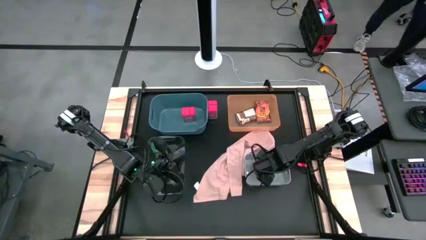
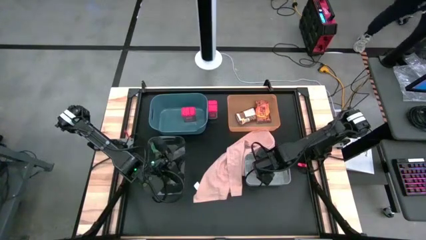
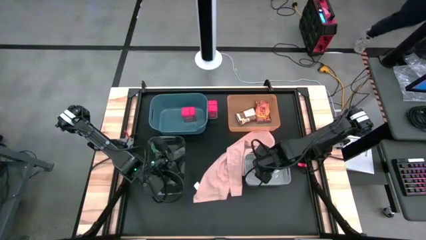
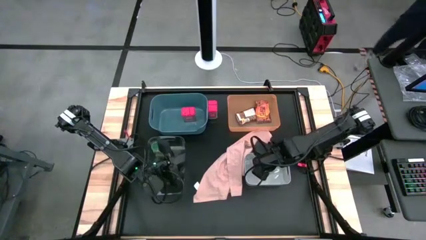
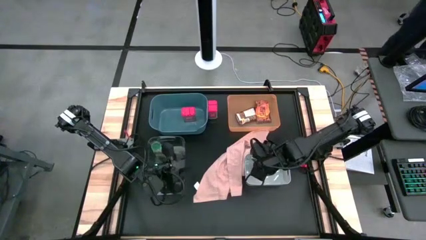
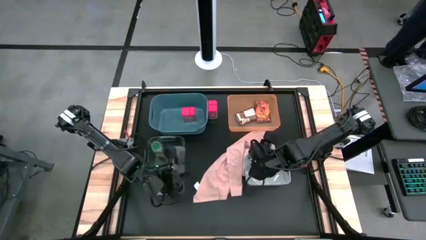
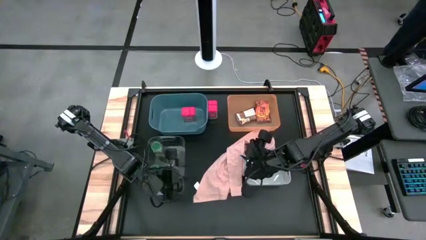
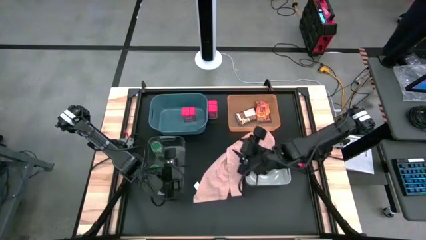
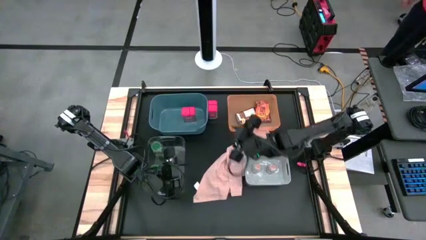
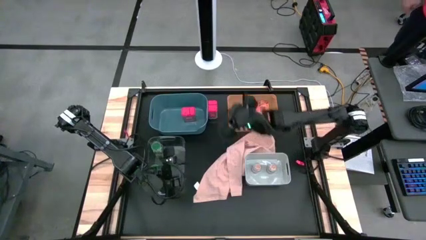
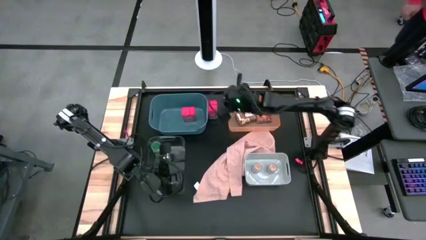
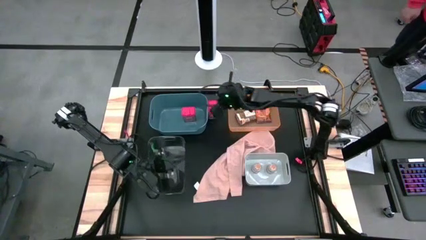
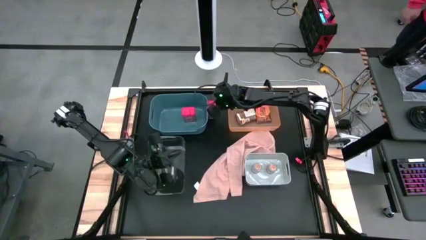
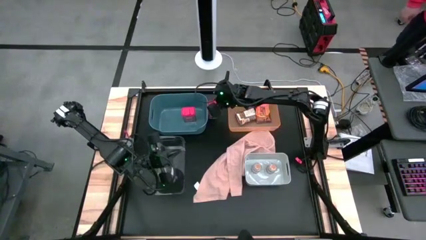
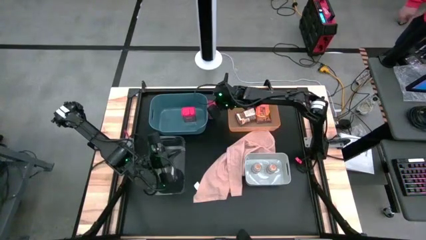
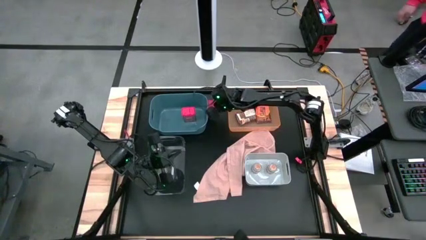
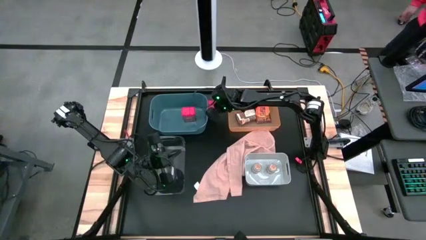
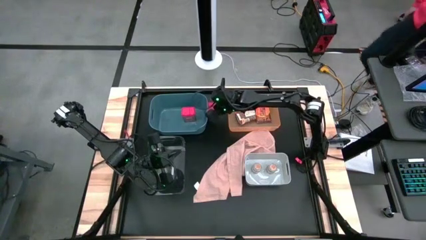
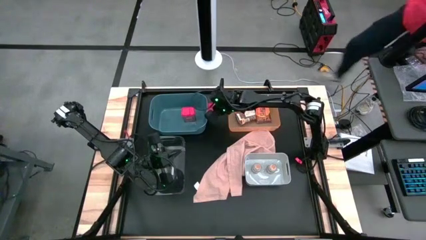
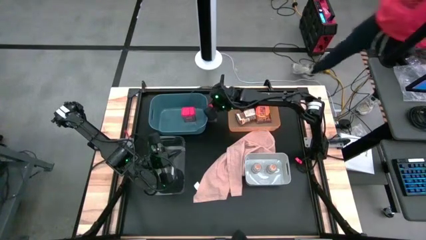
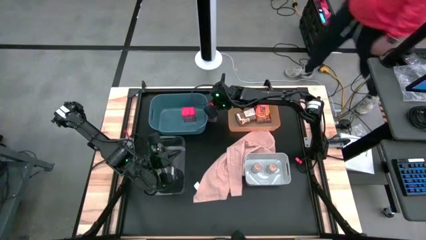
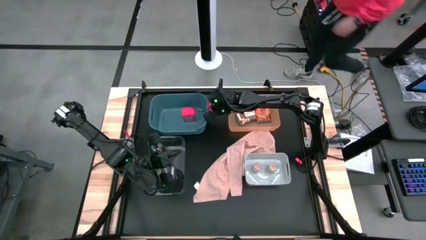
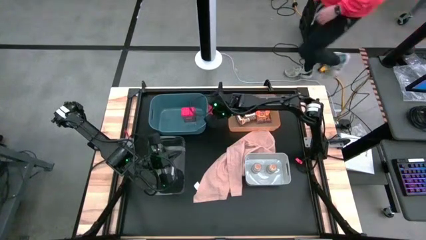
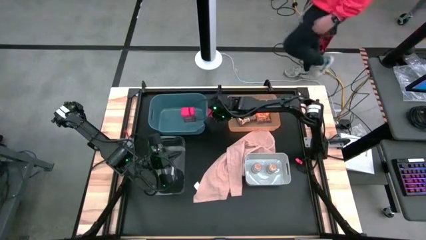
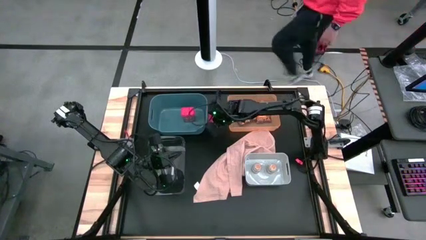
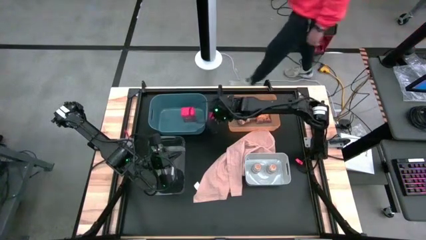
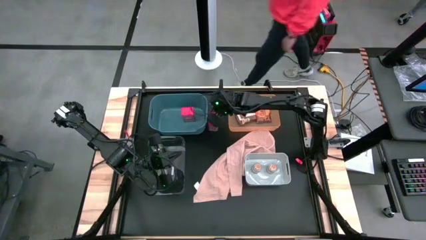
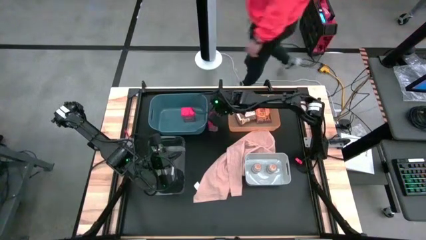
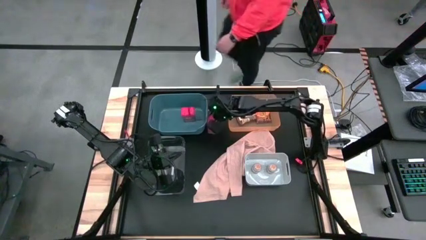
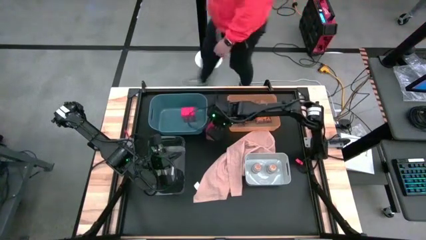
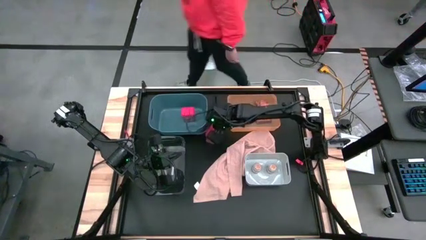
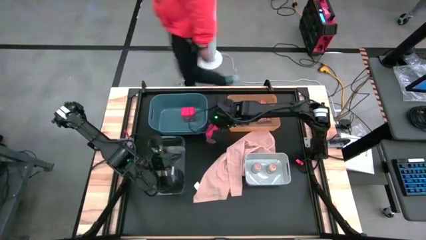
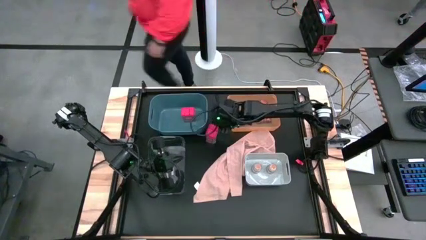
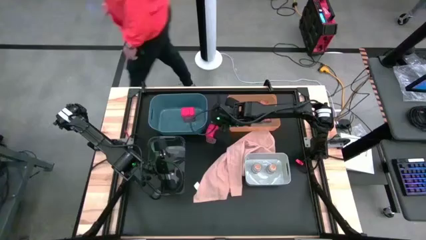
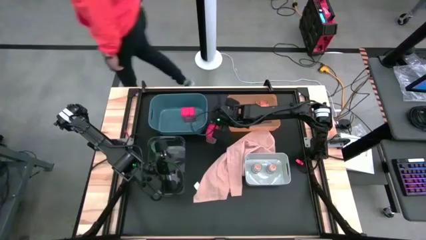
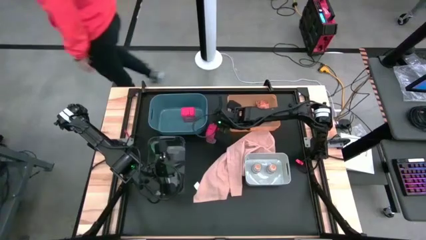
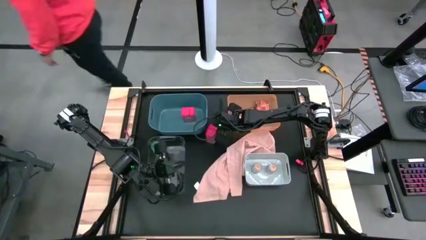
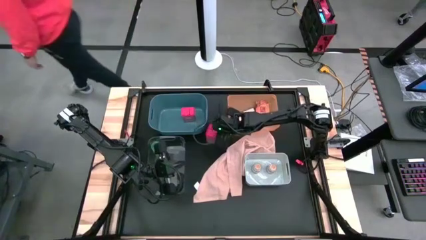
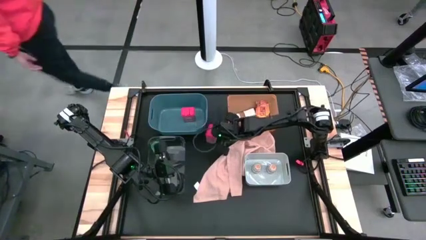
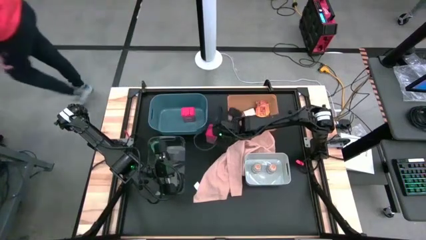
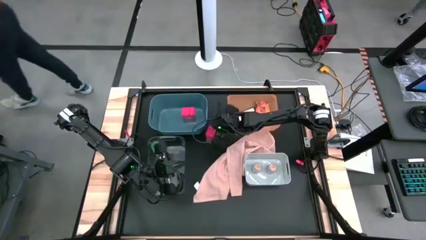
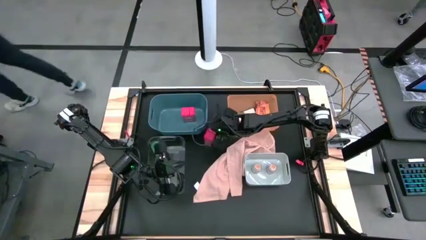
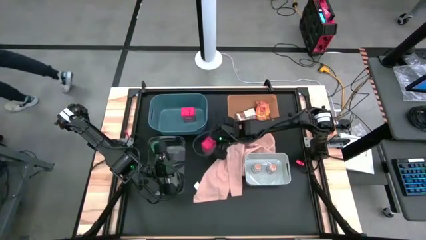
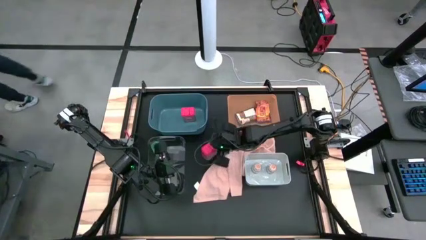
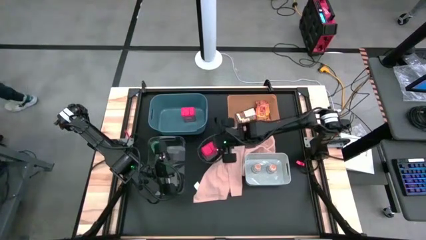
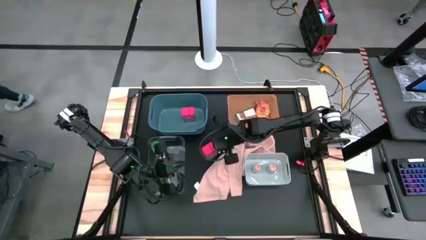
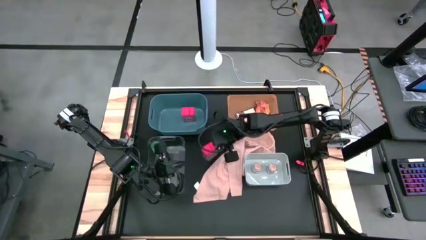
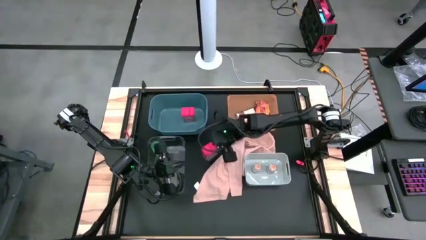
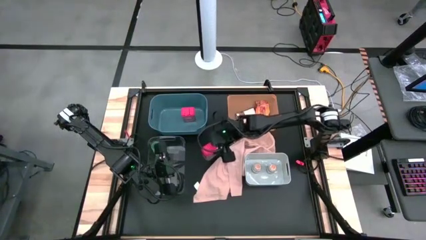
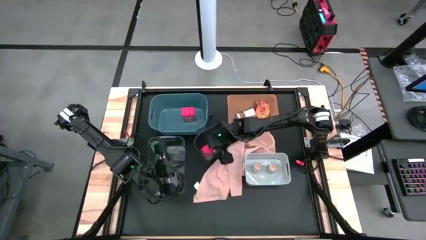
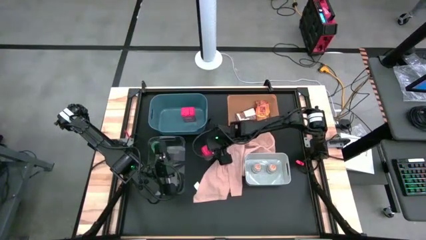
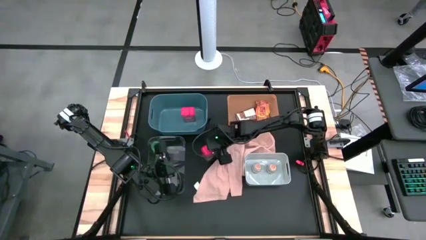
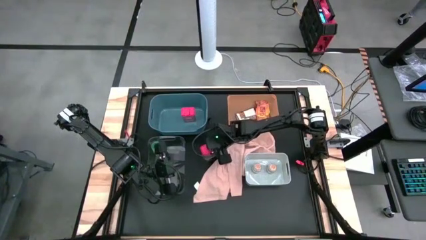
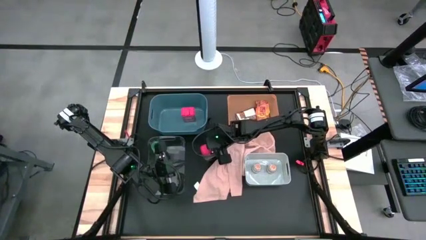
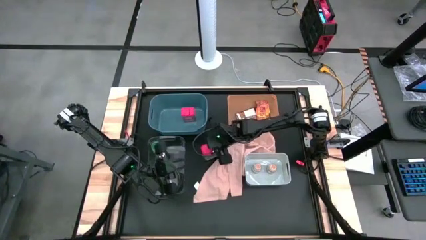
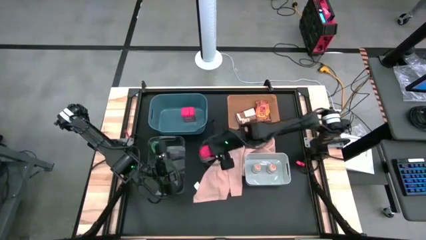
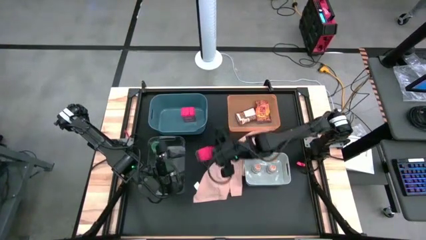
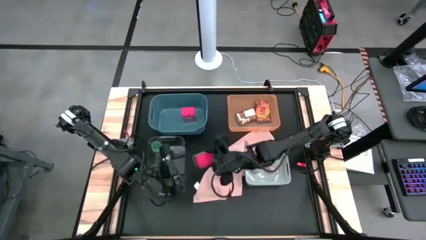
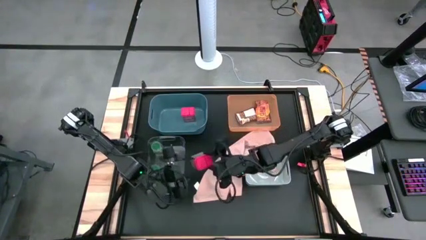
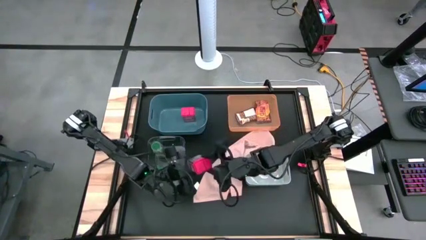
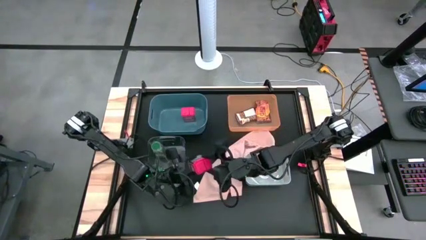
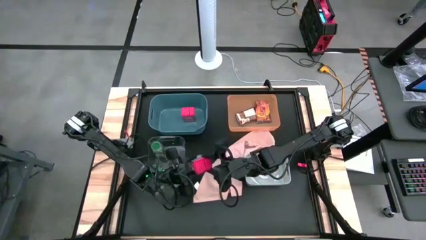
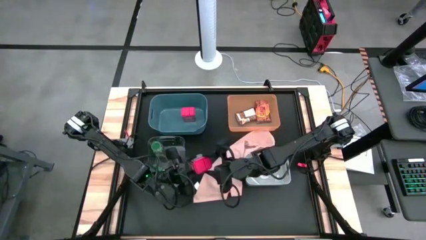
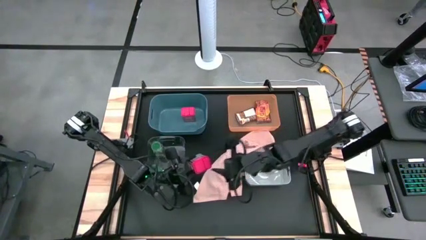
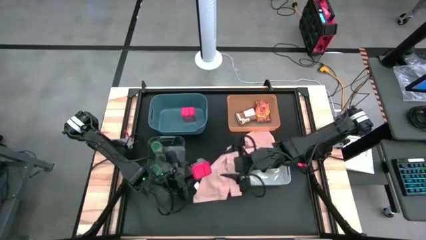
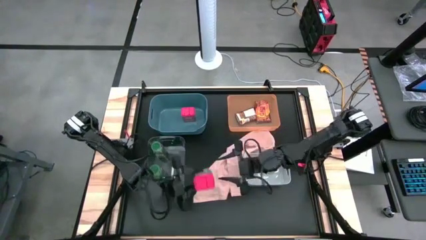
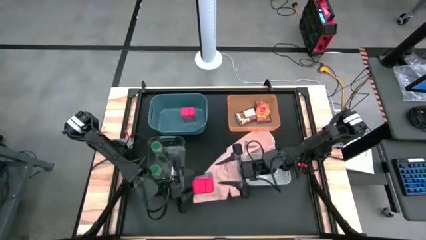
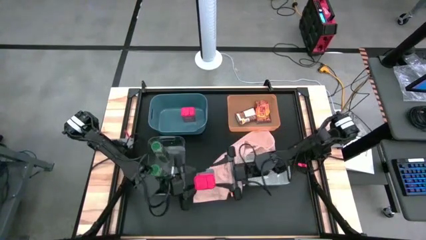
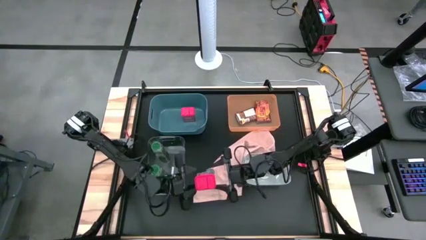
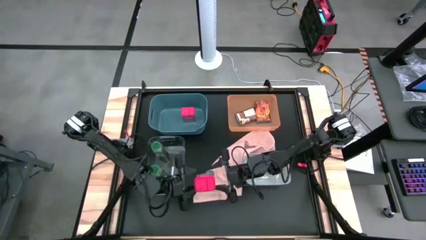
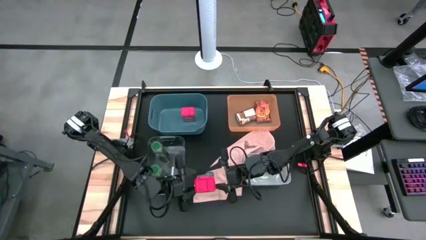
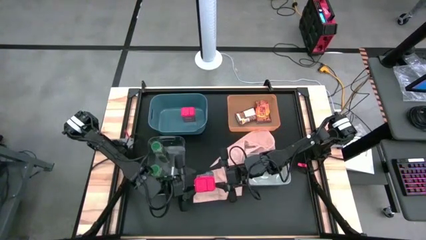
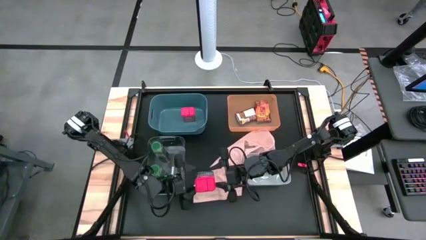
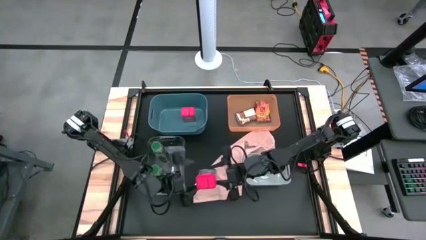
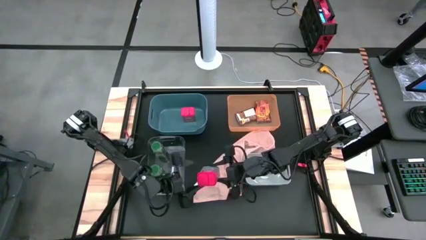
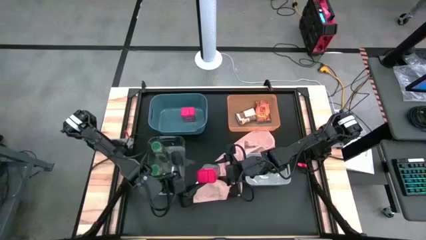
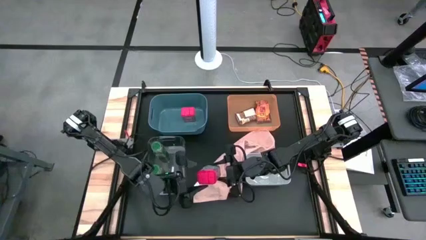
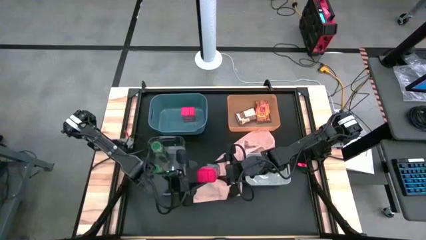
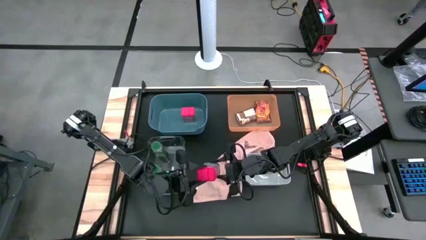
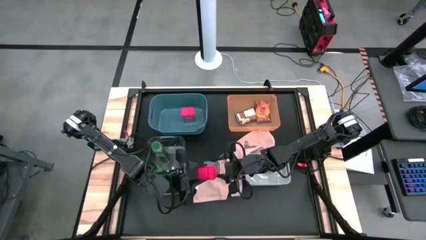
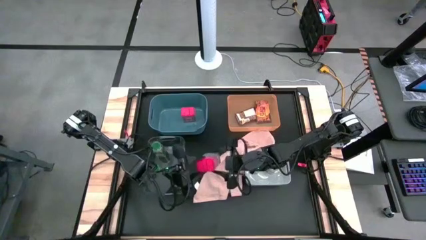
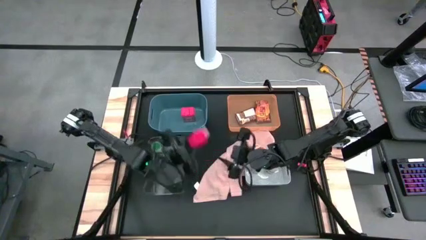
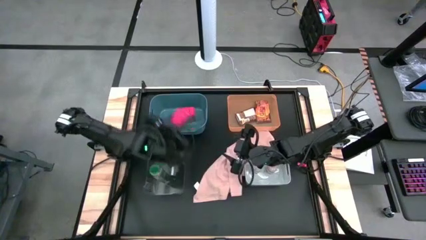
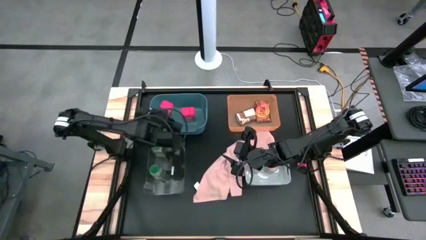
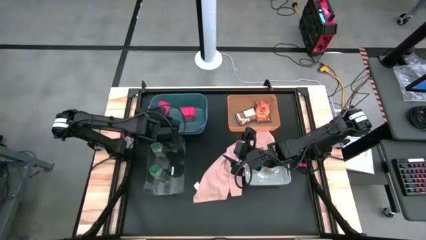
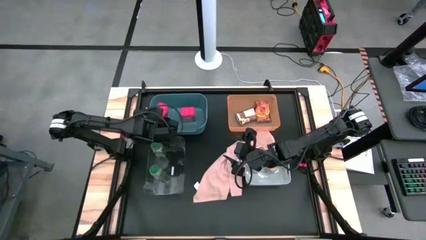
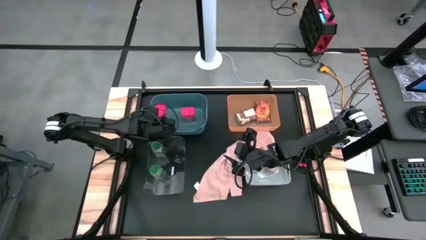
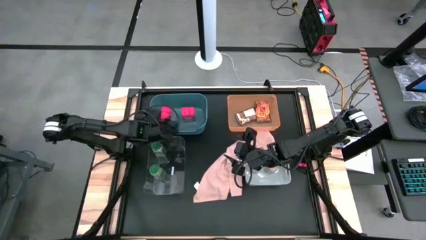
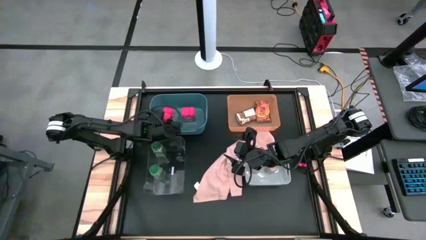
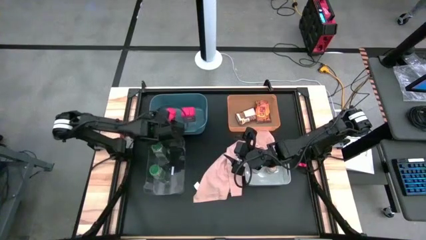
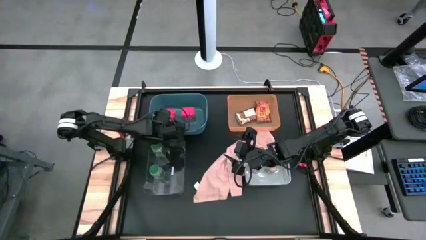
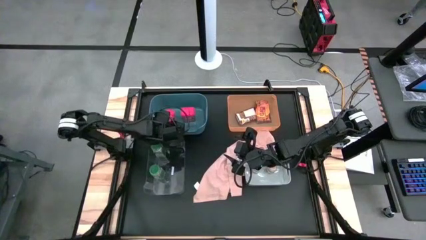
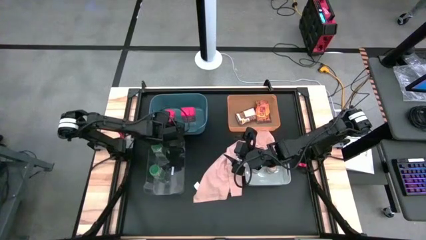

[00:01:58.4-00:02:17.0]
Task: Sort spices by type
Put the red seasoning can into the blue bin
